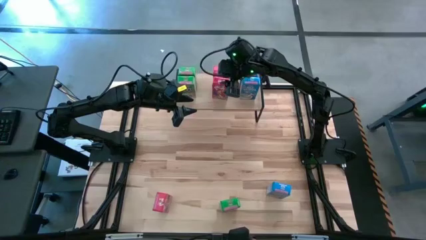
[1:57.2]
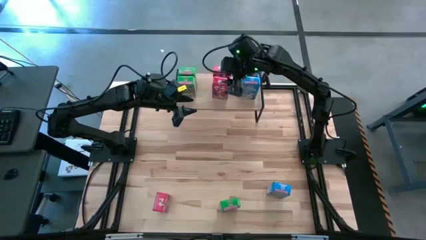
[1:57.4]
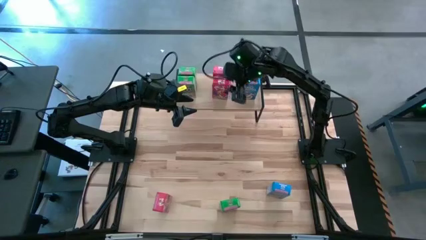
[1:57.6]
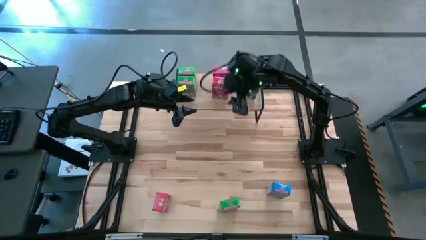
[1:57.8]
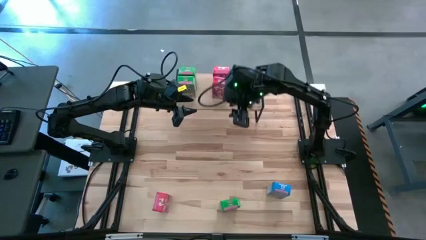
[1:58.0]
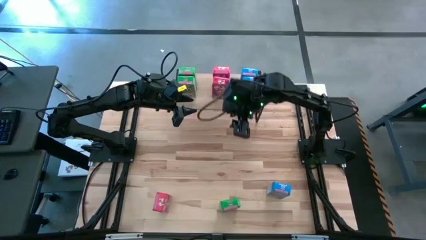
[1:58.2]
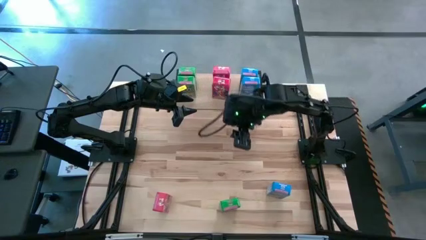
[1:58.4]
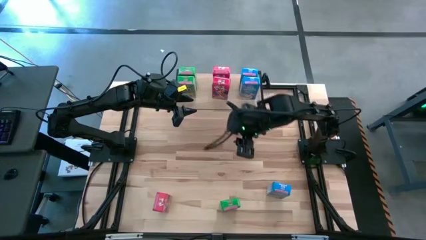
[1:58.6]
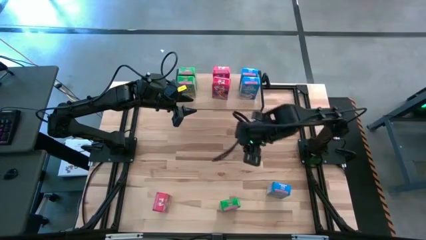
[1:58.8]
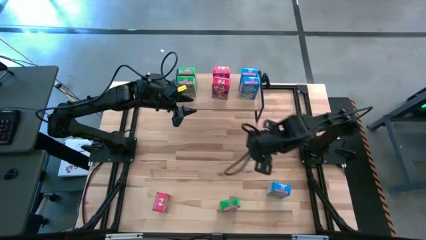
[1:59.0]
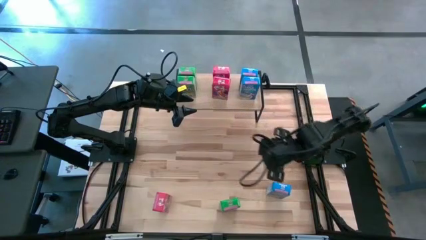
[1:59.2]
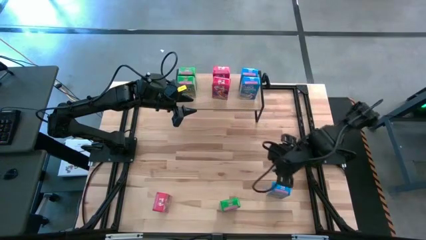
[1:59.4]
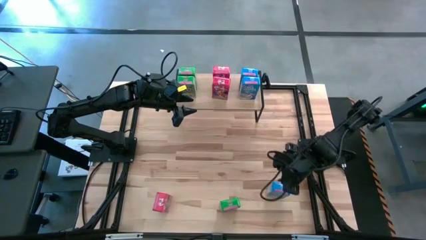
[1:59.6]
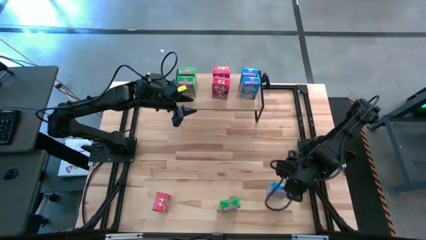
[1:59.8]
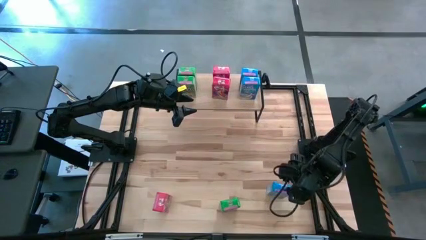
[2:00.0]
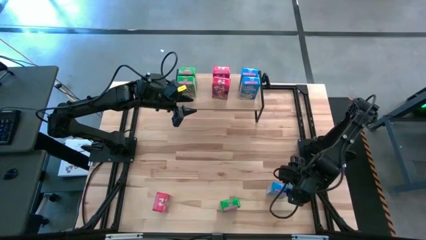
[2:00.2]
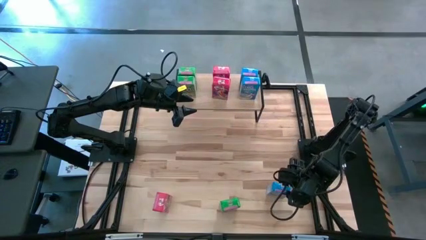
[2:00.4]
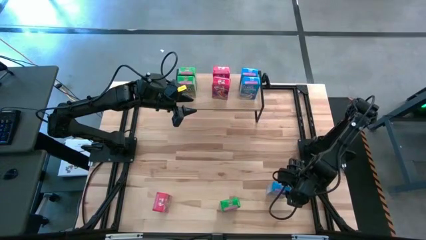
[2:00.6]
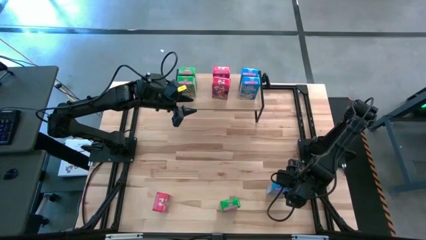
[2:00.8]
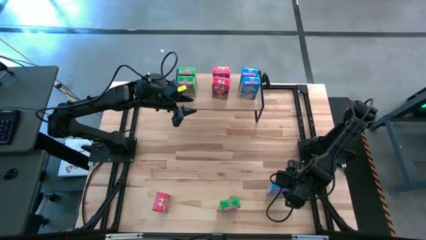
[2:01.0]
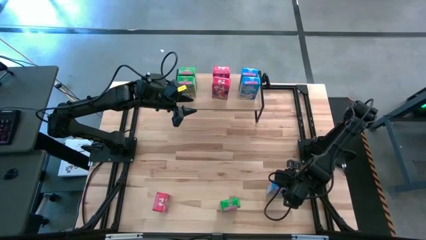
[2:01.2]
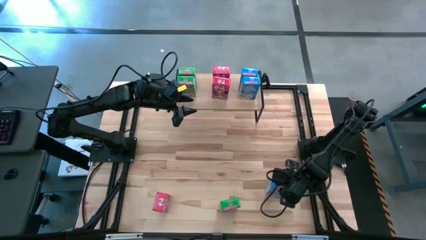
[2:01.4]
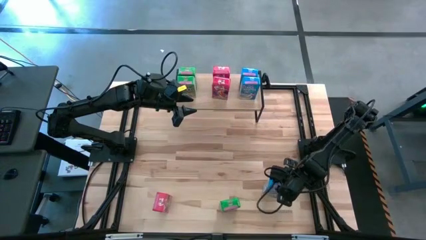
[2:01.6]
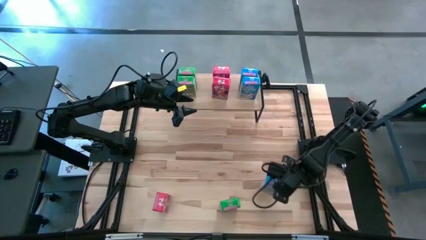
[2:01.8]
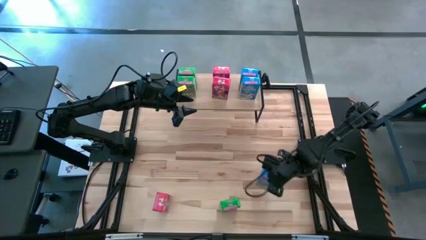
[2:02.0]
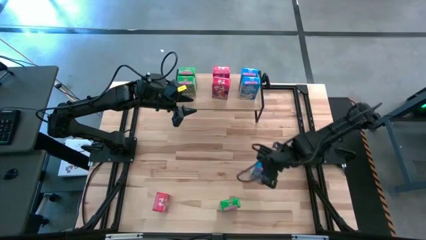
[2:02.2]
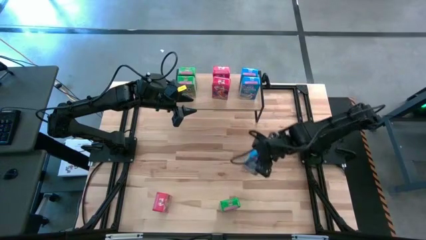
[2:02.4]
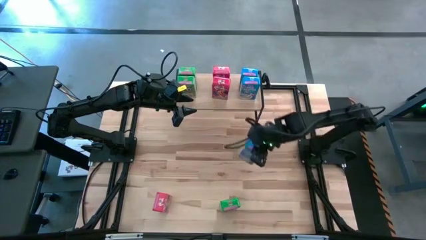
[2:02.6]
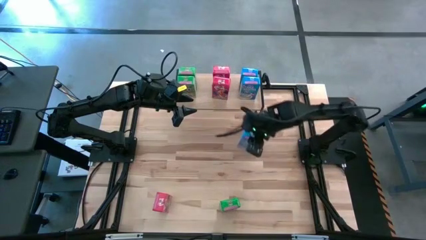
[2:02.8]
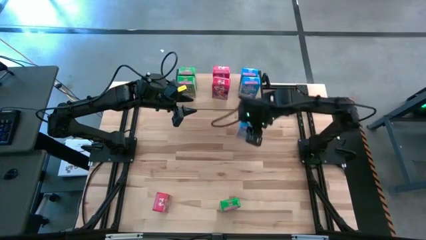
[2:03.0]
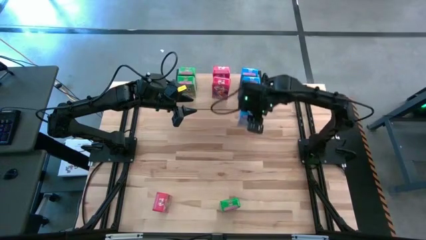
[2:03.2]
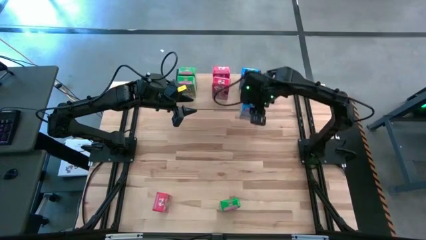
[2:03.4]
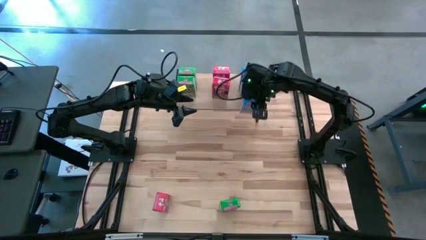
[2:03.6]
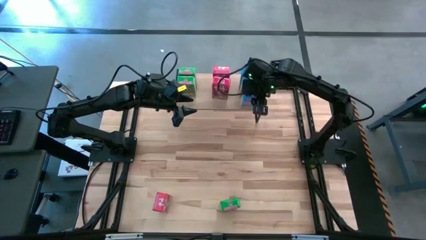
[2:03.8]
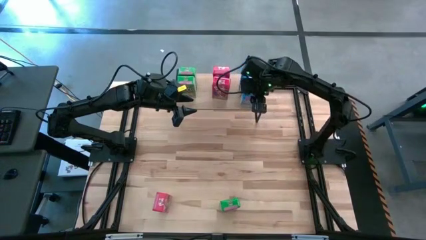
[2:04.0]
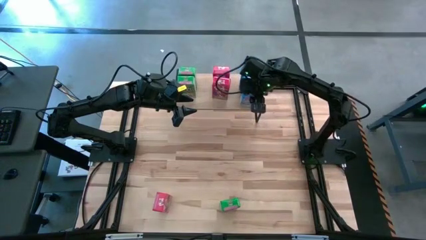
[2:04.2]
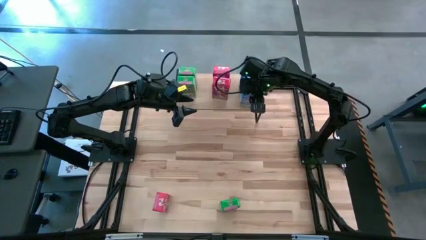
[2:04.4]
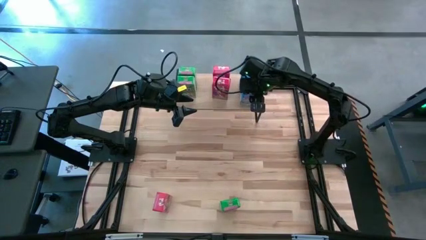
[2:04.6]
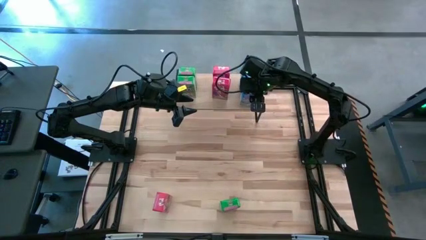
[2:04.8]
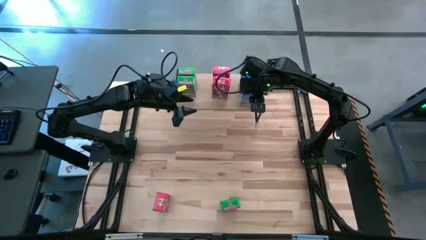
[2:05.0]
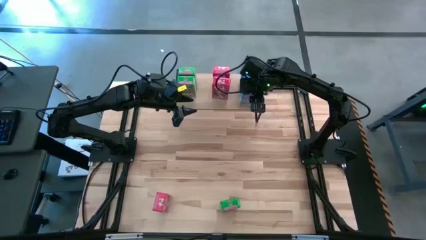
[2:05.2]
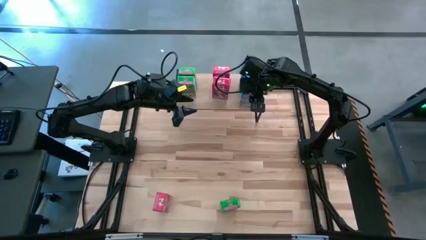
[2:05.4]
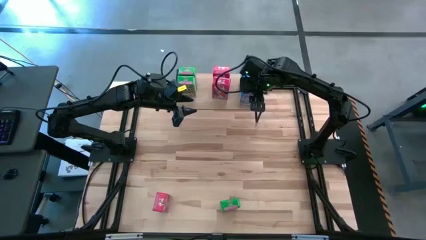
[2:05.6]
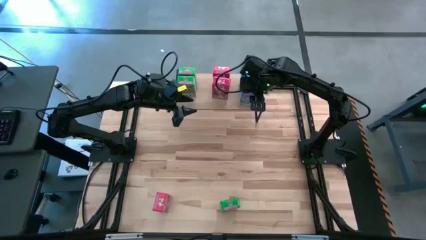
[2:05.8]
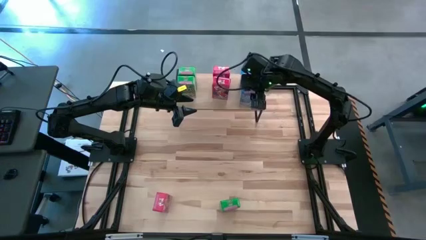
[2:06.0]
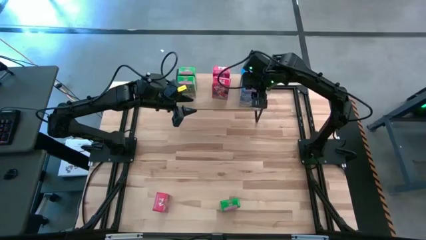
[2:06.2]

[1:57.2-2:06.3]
Task: Stack cereal on shelf
Put the blue cereal box on the shelf aligned with the other blue cereal boxes

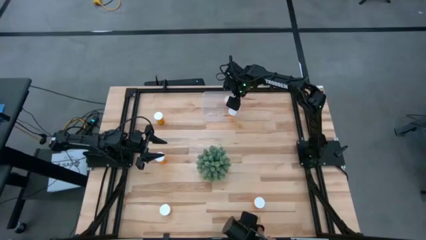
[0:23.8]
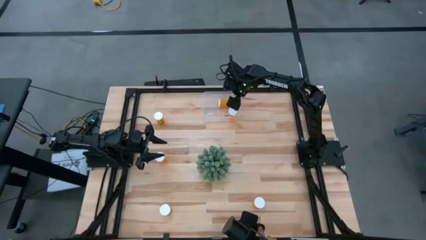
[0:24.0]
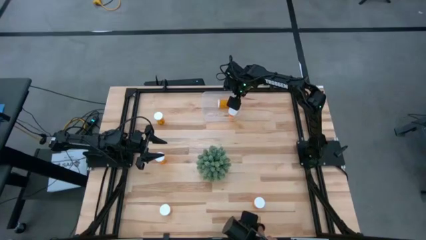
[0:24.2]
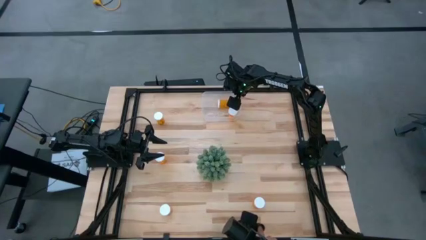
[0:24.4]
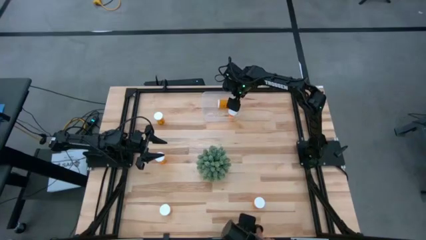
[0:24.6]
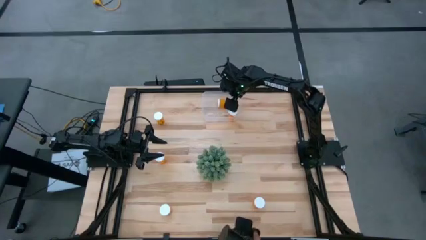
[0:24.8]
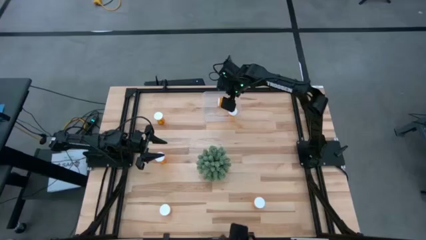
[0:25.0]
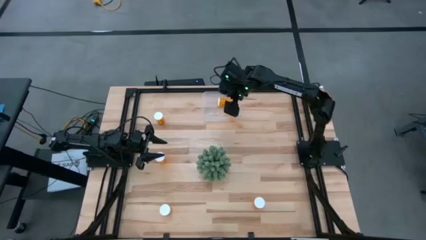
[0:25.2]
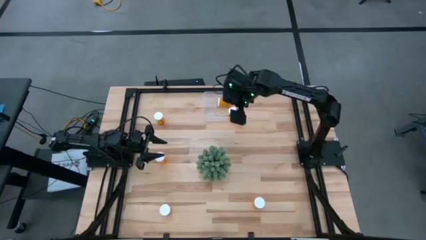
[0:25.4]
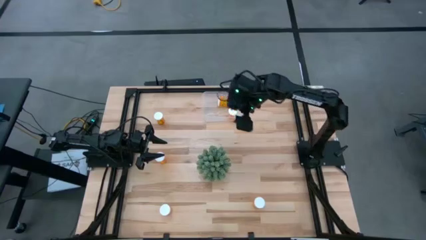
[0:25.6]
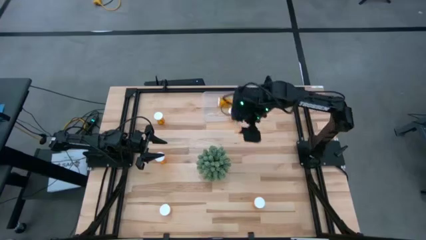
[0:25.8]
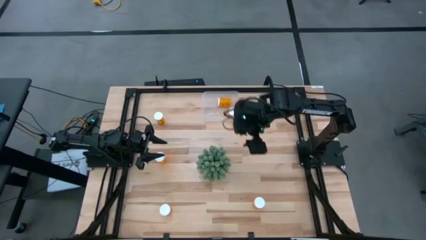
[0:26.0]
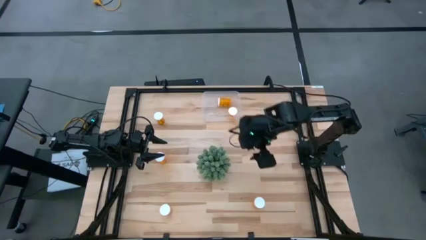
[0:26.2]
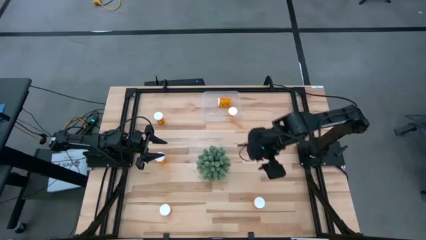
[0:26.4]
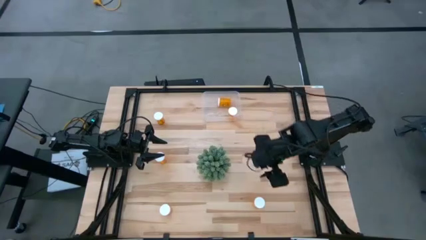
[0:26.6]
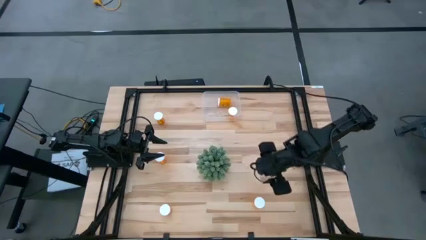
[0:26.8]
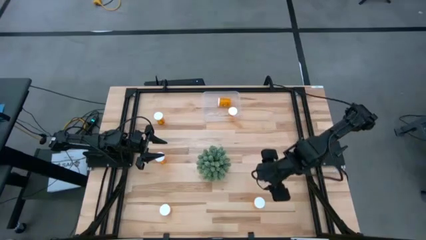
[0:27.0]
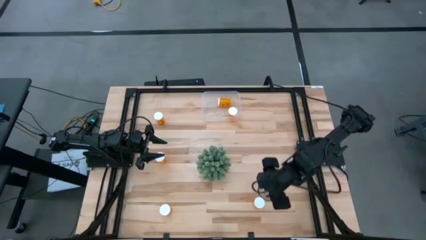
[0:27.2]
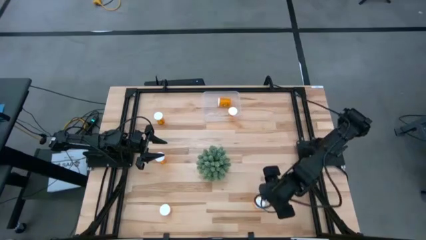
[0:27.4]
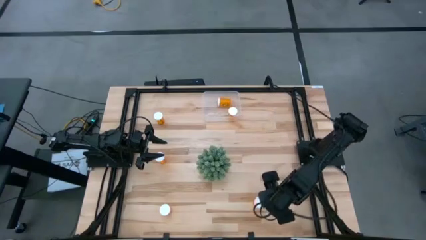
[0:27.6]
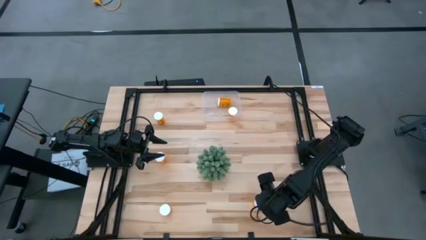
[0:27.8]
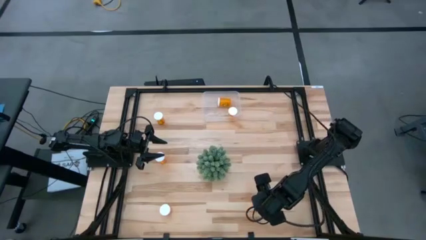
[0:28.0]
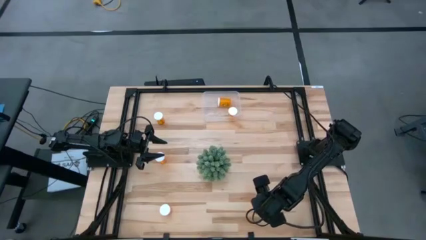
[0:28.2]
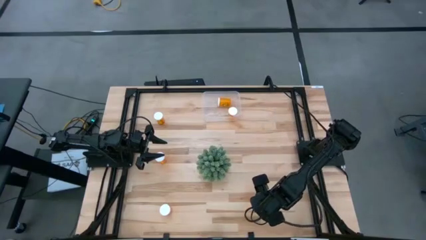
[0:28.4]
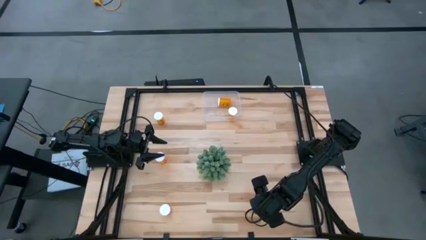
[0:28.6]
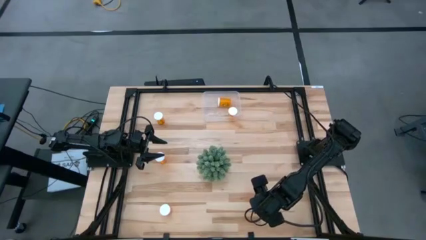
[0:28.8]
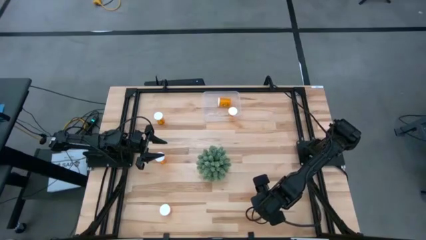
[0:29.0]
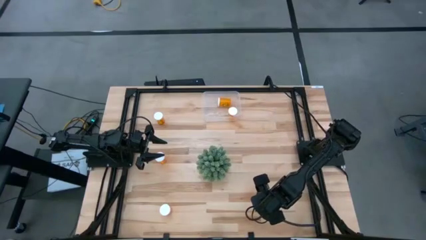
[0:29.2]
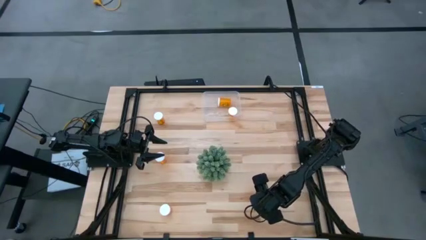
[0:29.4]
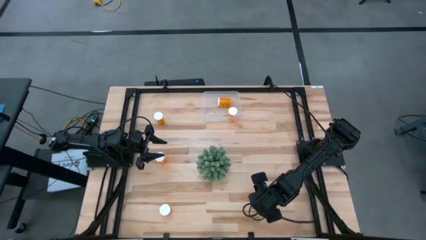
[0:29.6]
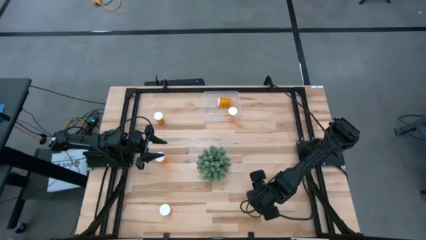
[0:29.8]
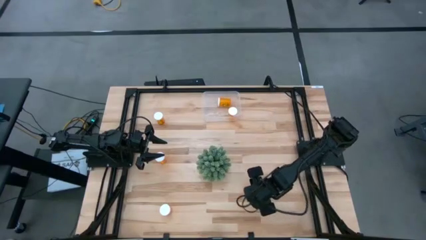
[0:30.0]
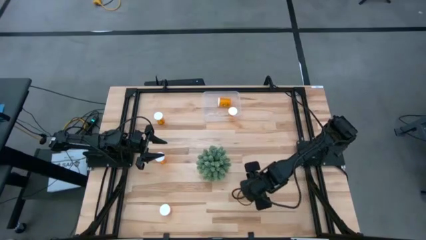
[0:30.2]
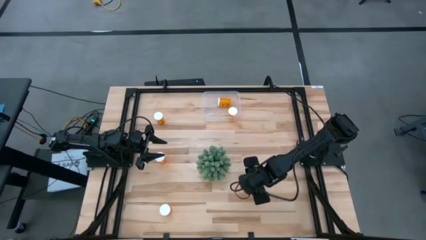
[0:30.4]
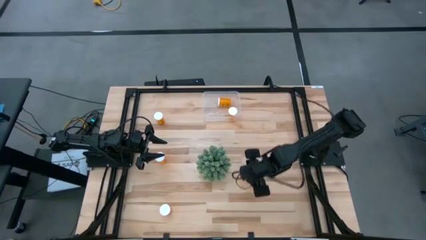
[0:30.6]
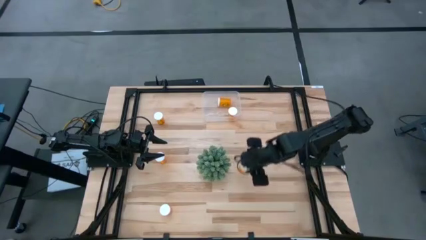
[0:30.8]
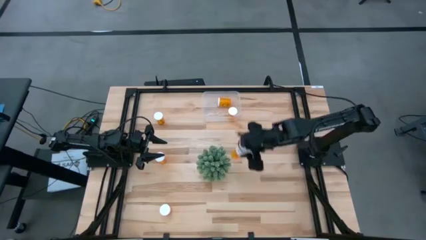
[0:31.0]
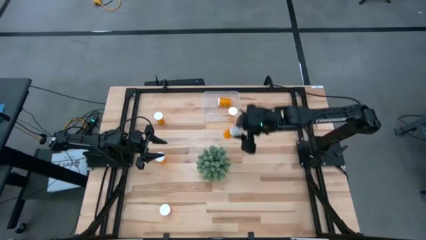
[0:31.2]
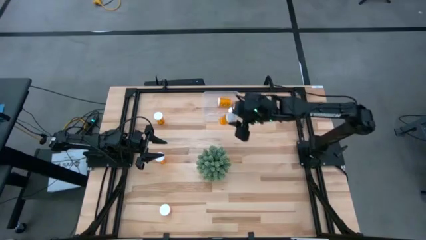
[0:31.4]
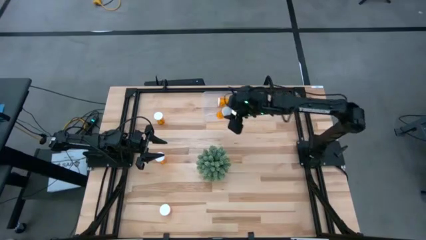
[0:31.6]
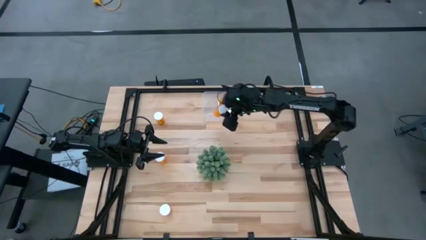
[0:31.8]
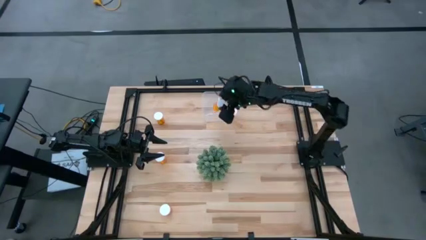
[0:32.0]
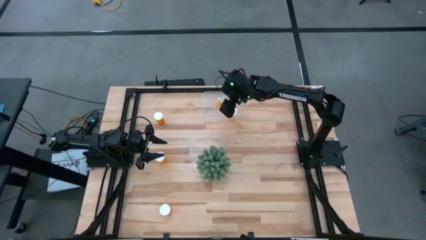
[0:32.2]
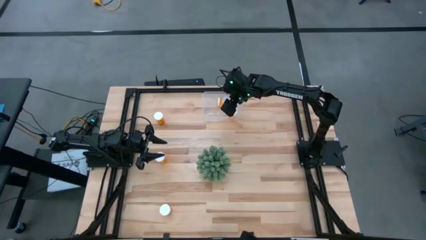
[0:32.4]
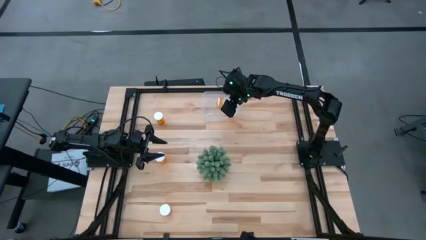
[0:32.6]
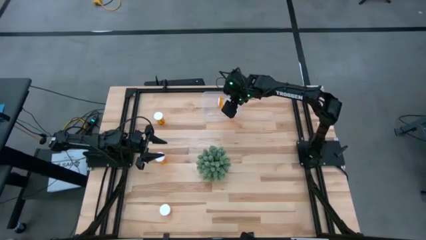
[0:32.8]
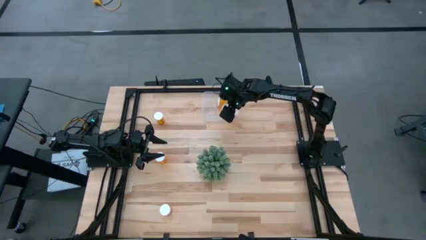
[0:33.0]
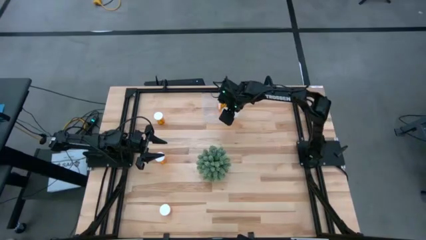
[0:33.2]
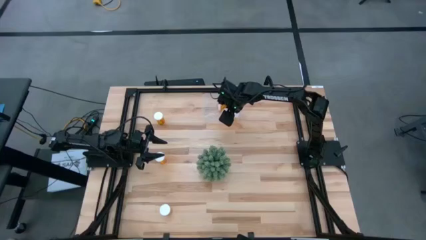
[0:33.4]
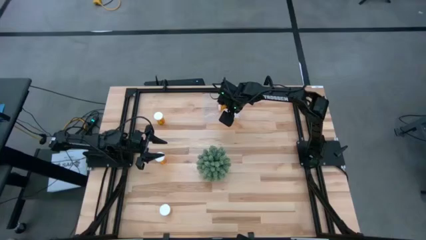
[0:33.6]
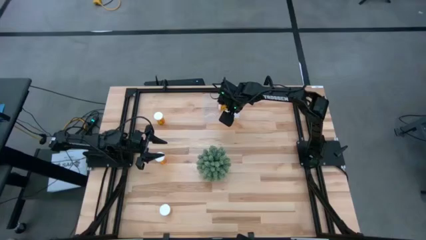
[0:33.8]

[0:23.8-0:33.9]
Task: Pick and place pill bottles into a basket
Put the orange pill bottle into the transparent bin
